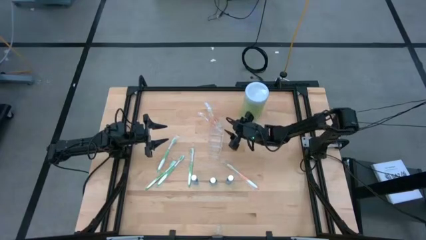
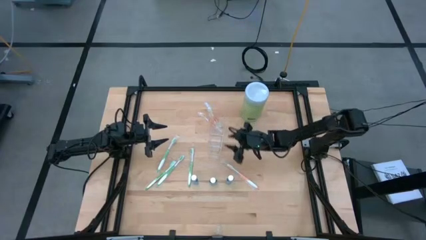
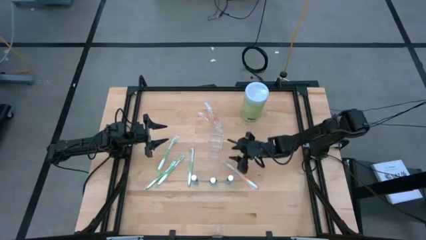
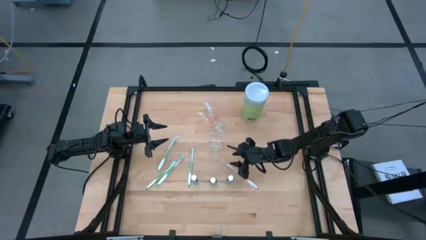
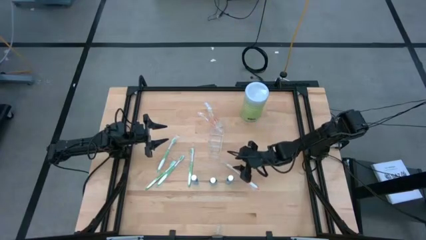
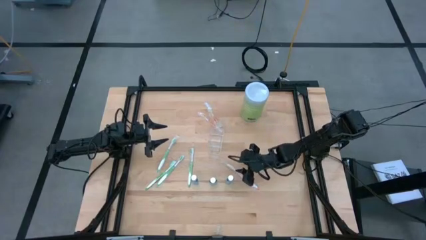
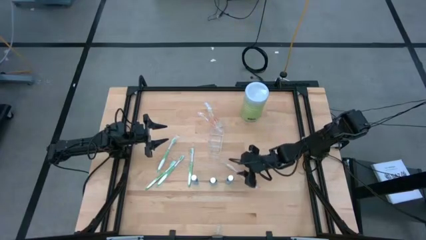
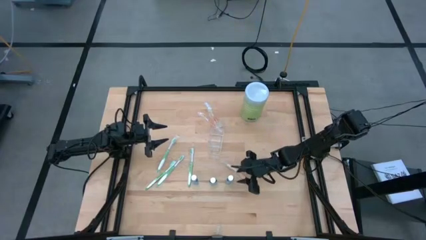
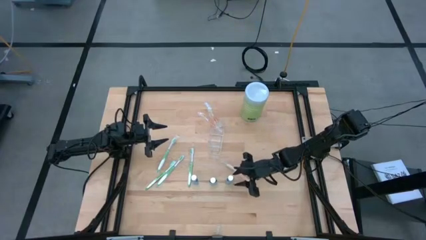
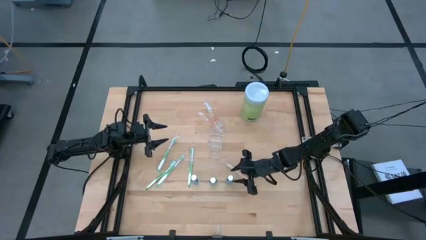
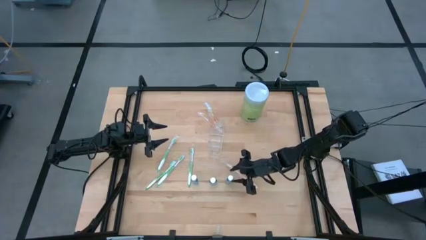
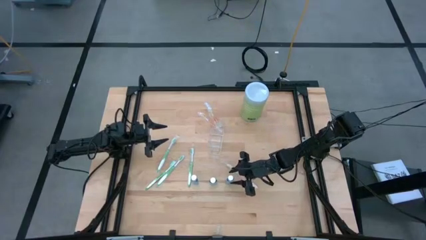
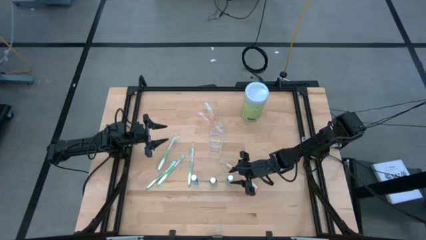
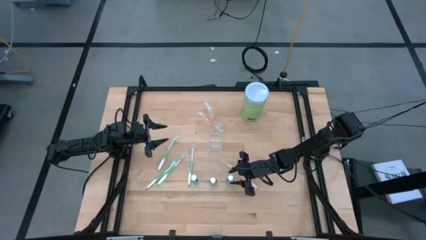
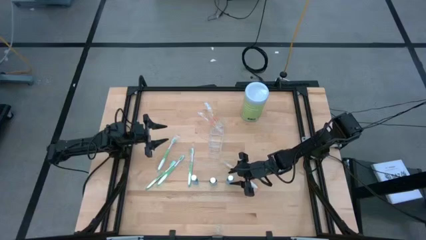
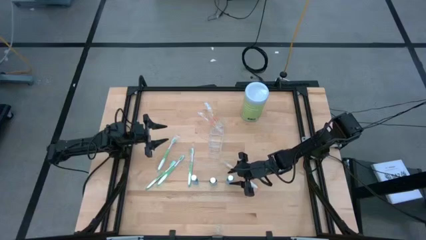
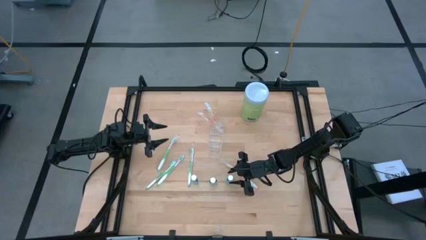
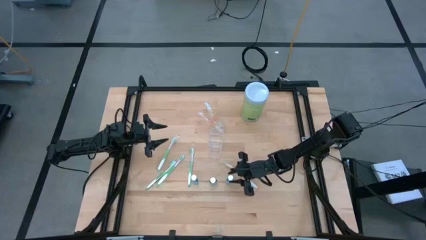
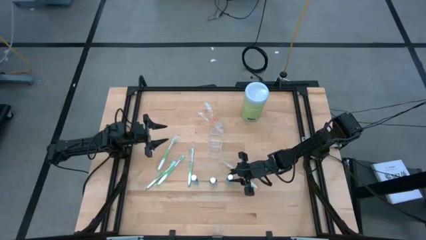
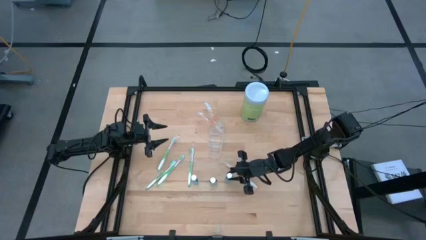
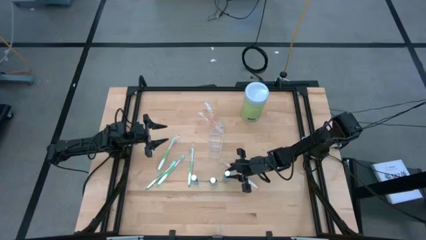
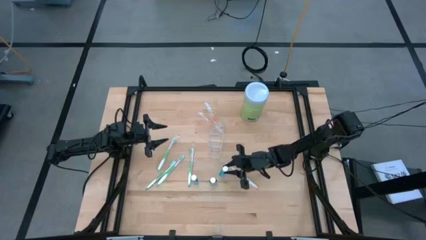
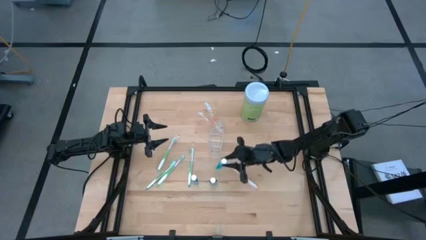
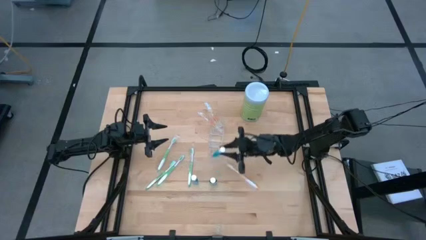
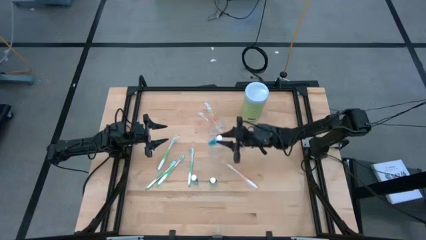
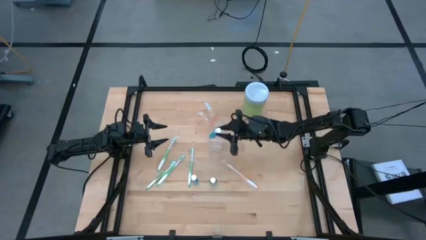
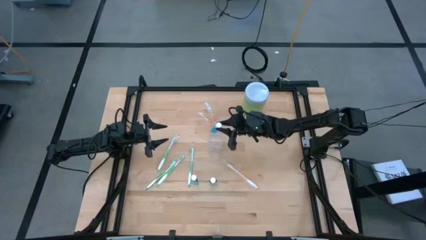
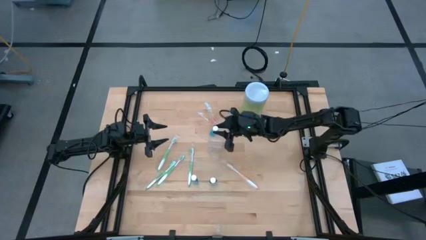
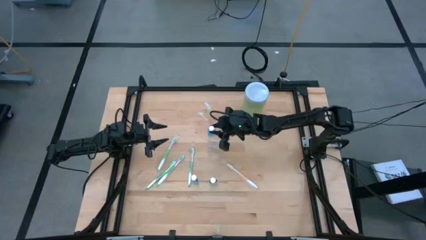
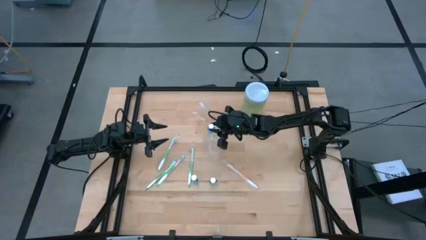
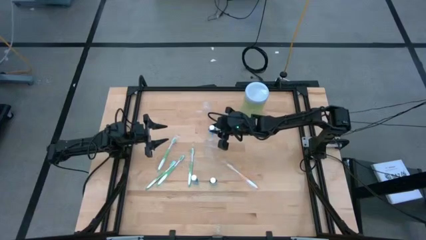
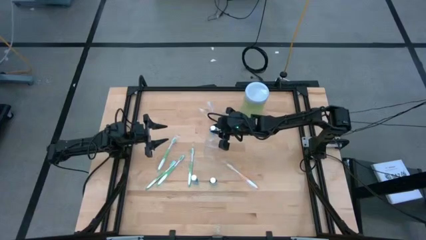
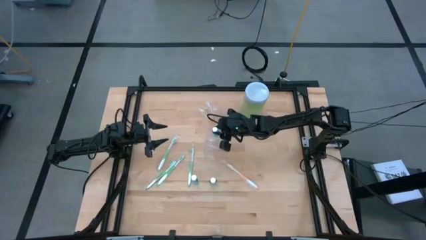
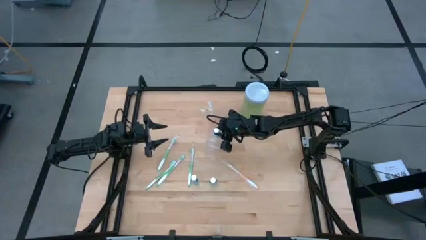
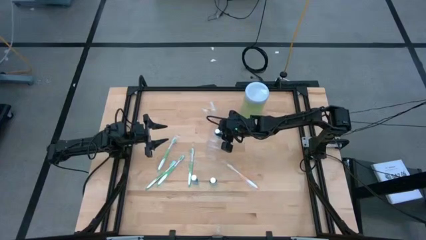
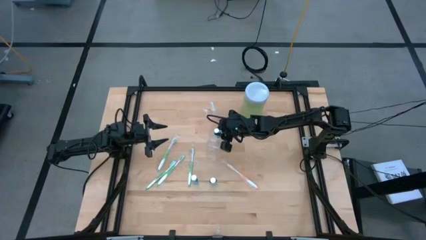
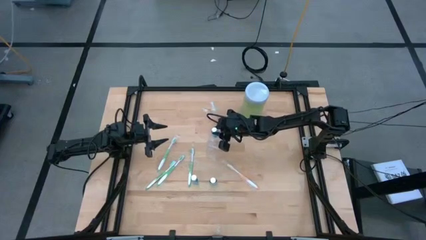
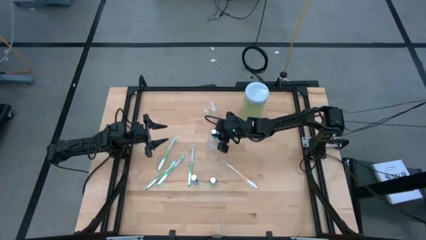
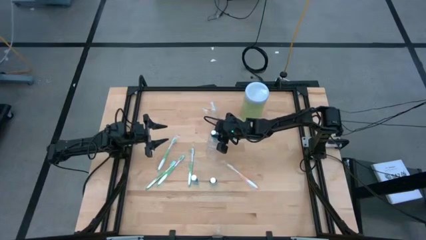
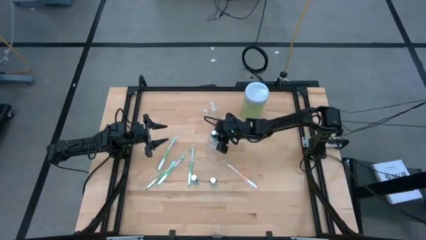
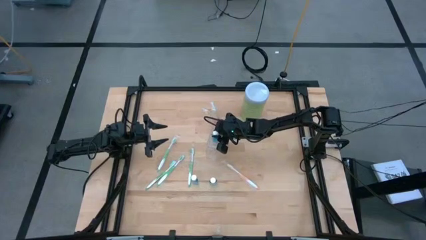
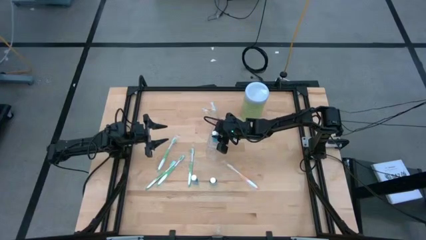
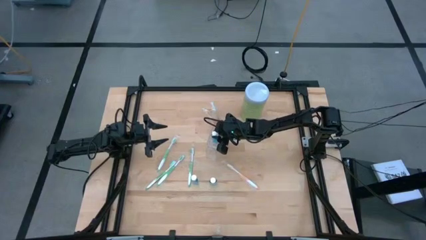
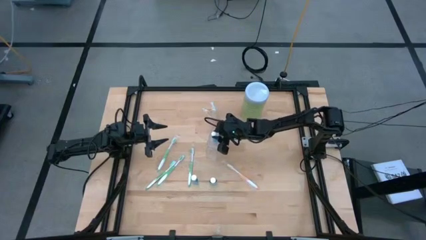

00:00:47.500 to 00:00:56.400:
Task: Pick & Place toothbrushing station
Put the blue mouthwash into the middle portion of the transparent organizer

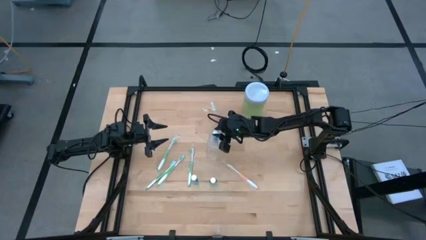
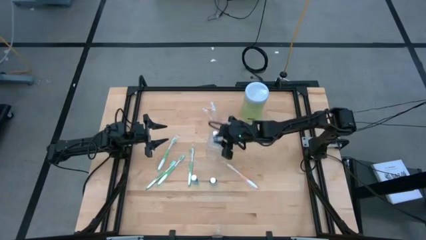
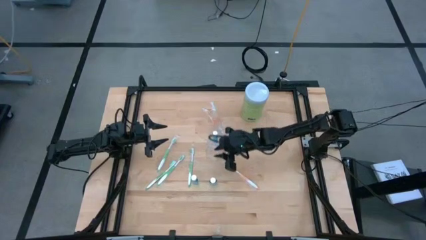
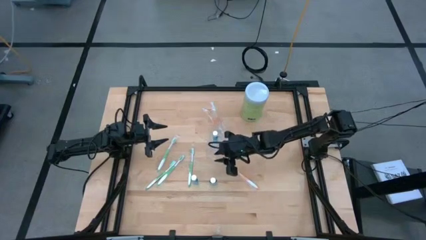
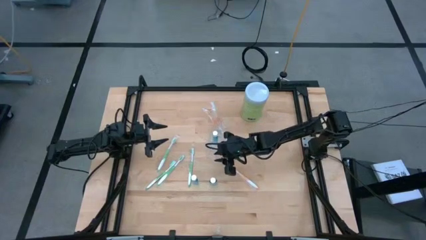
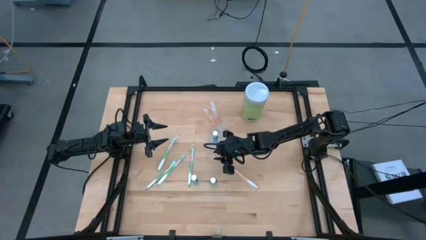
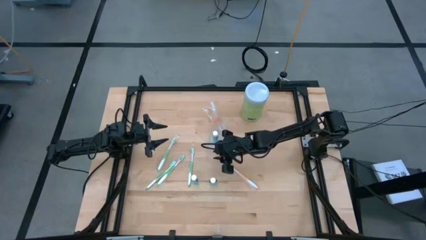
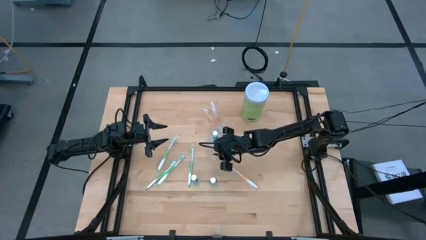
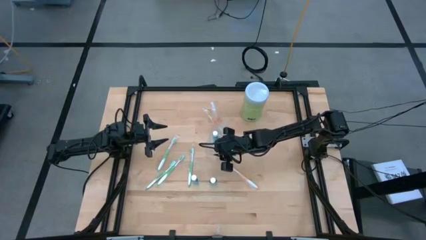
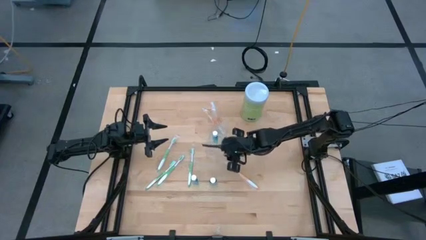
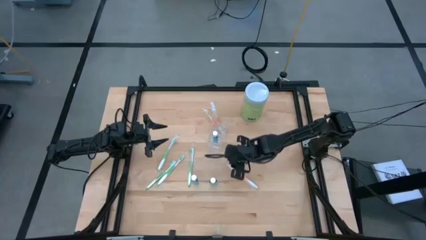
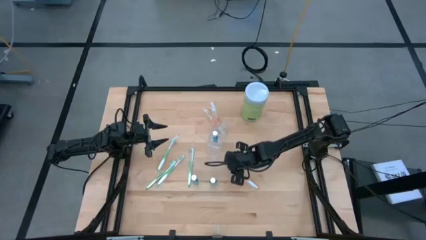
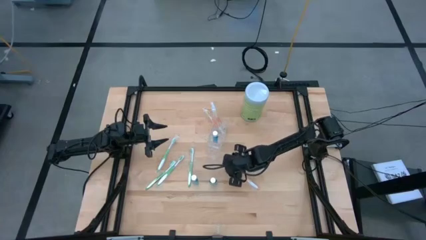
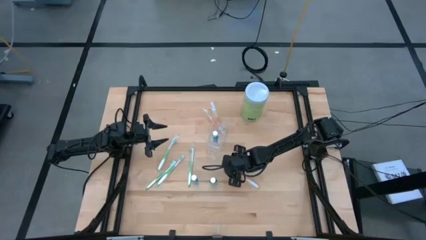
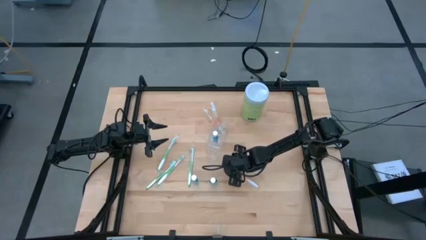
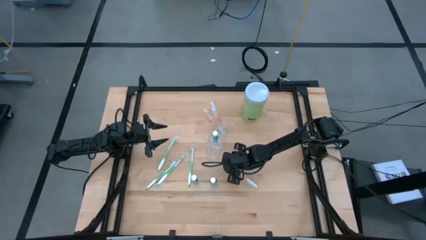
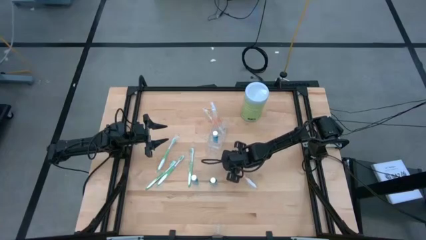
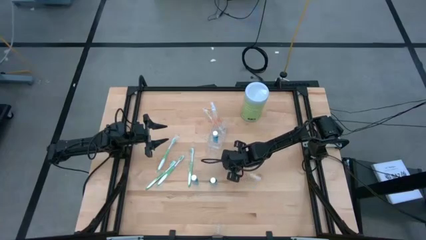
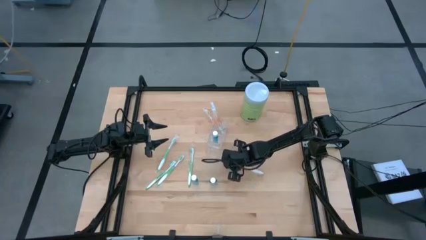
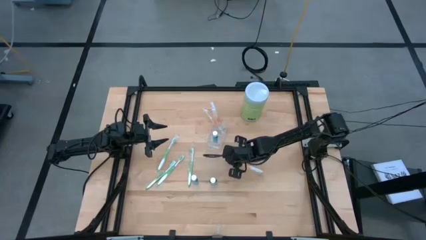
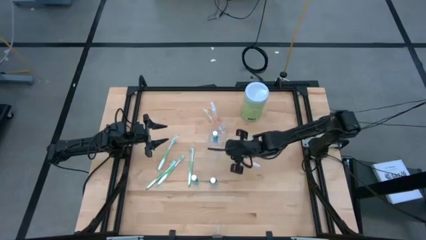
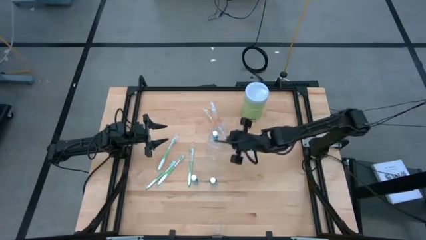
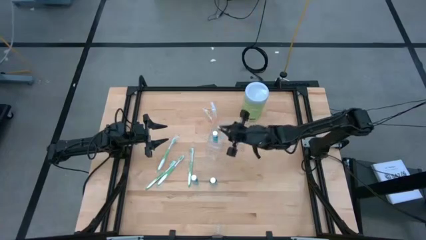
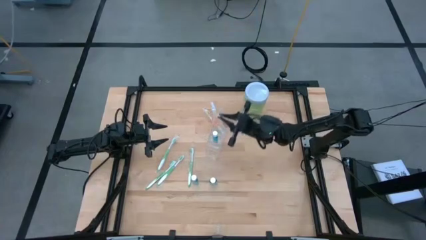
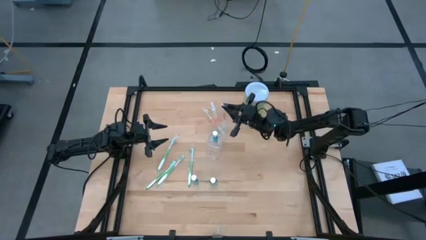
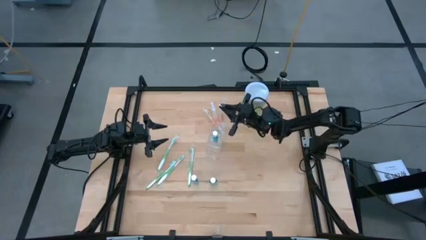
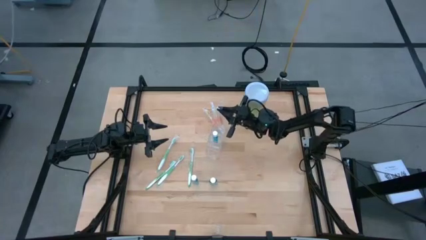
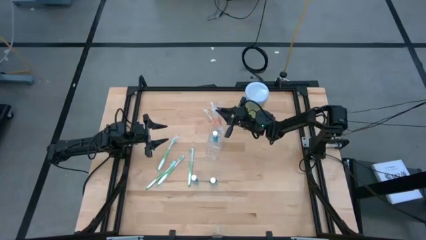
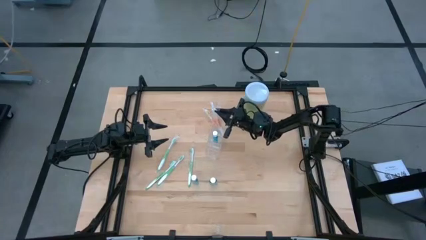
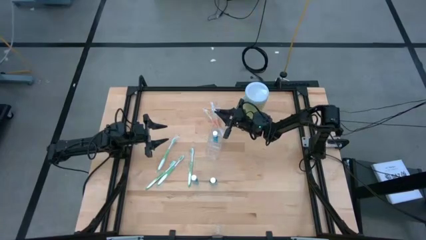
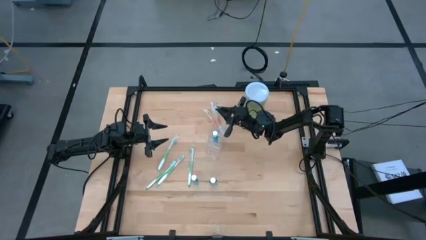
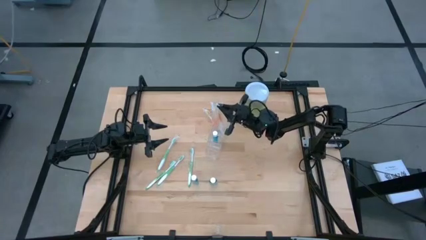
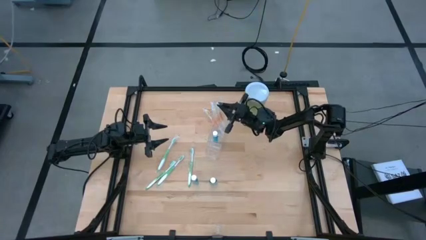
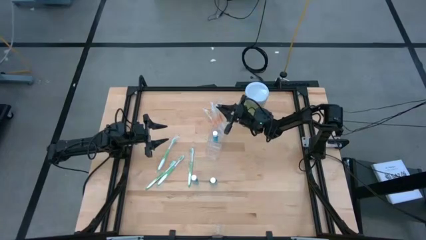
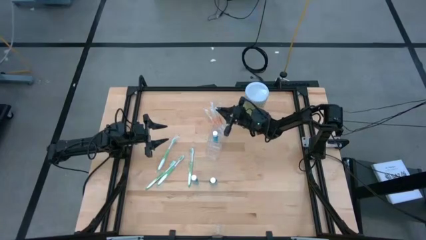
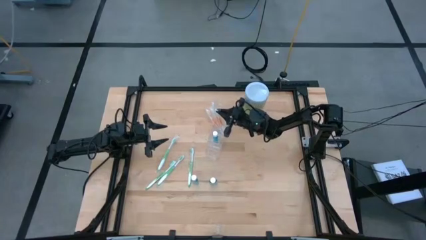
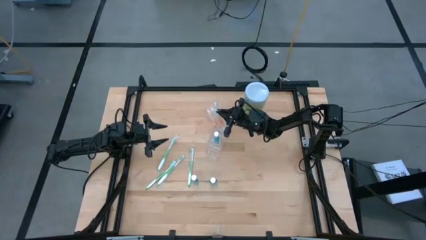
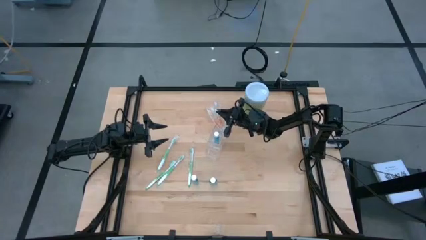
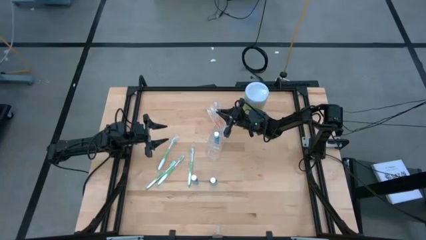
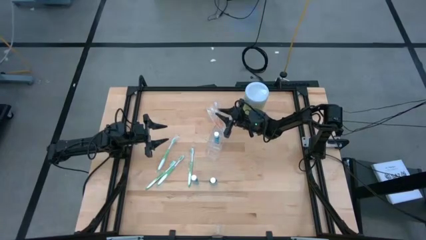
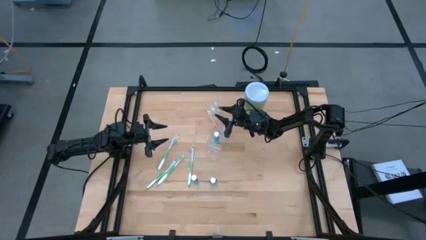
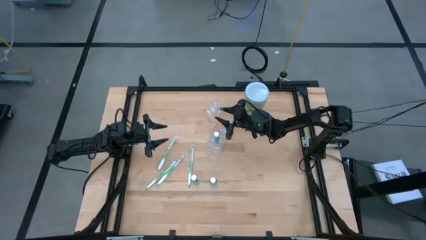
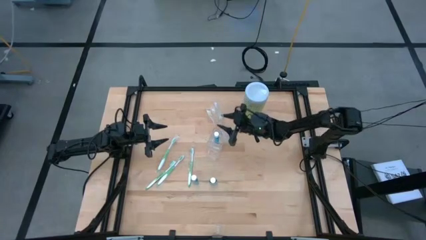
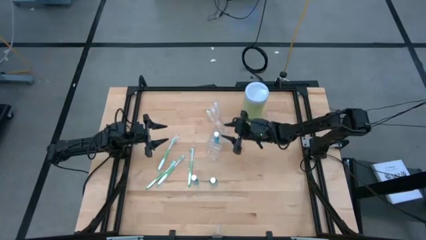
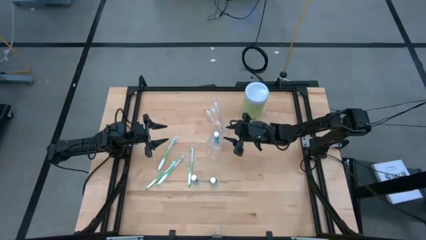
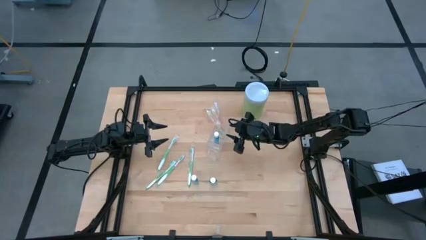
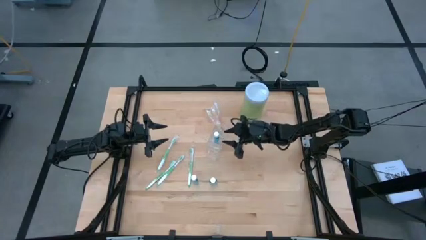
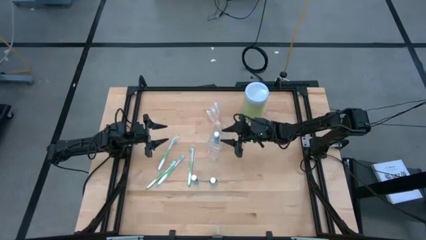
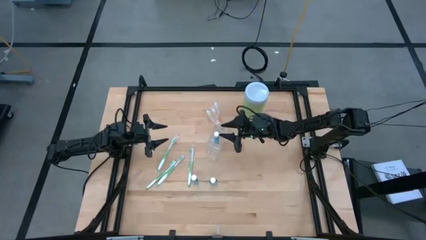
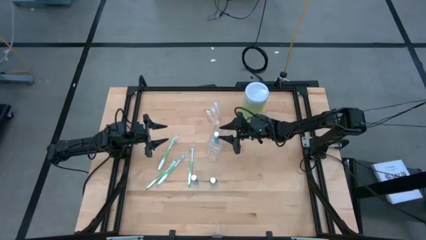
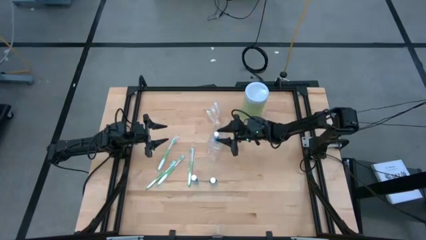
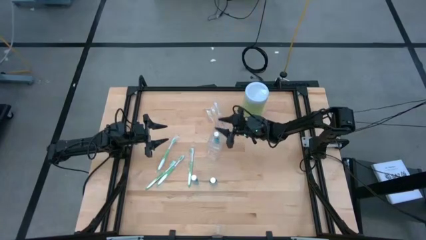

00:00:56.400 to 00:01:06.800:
Put the orange toothbrush with the other orange toothbrushes in the transparent organizer
